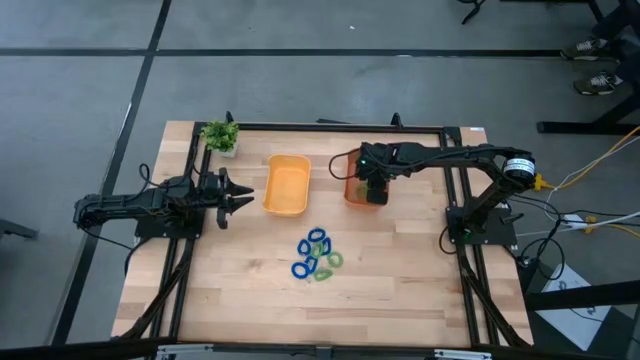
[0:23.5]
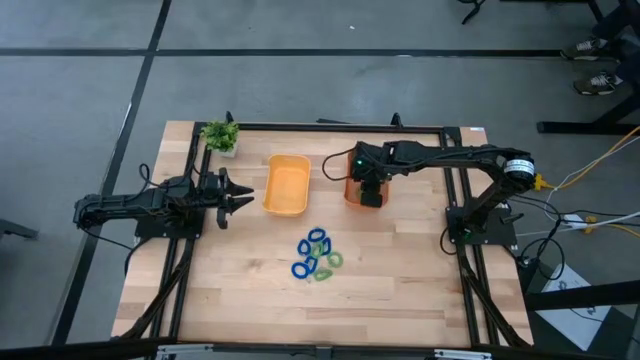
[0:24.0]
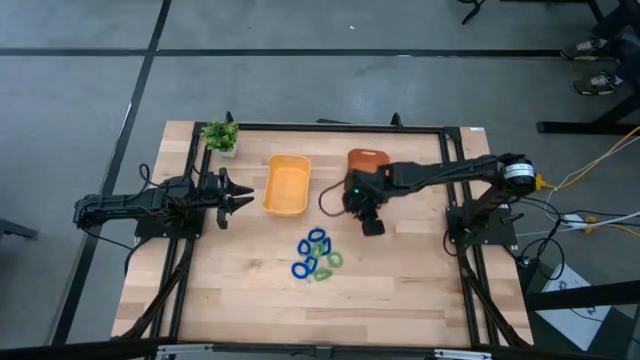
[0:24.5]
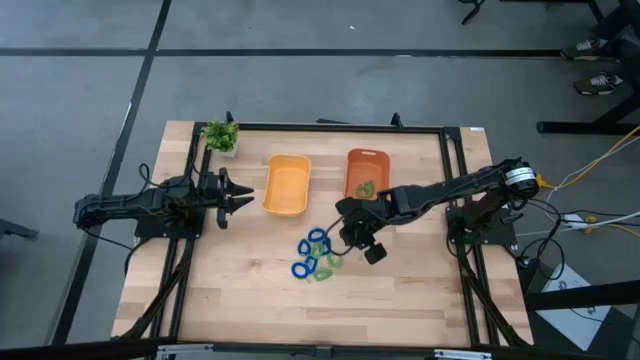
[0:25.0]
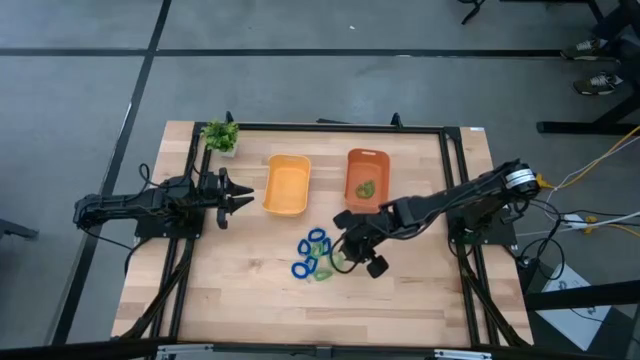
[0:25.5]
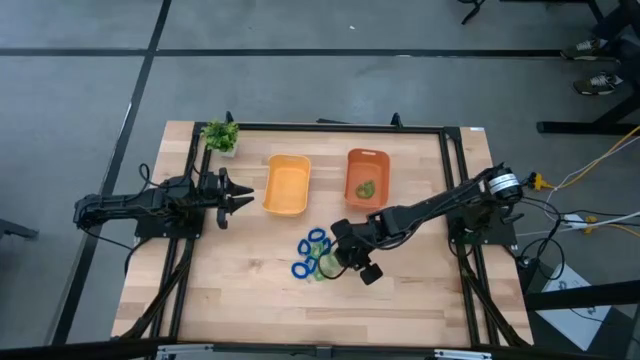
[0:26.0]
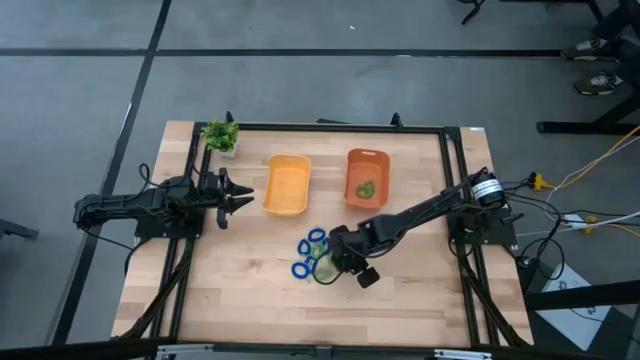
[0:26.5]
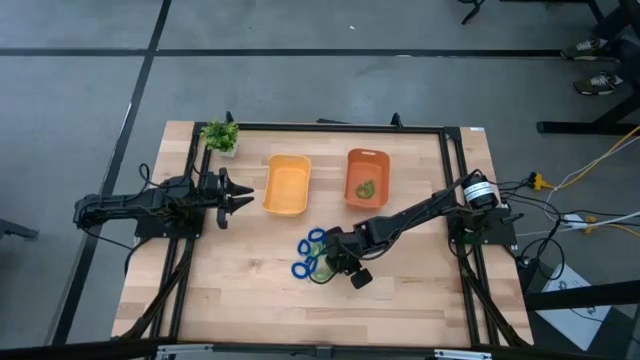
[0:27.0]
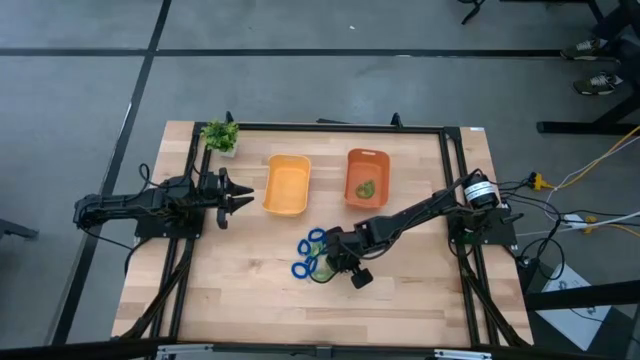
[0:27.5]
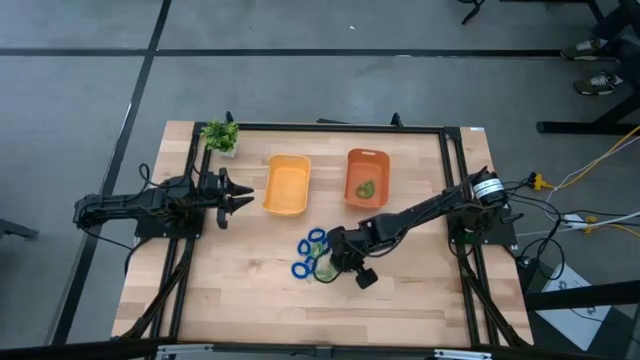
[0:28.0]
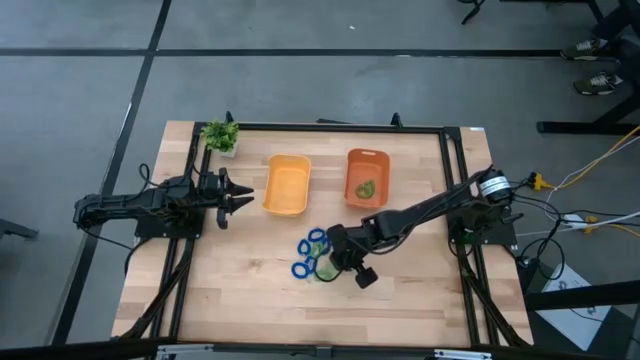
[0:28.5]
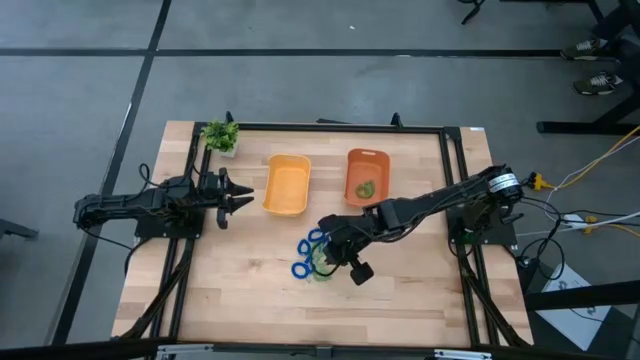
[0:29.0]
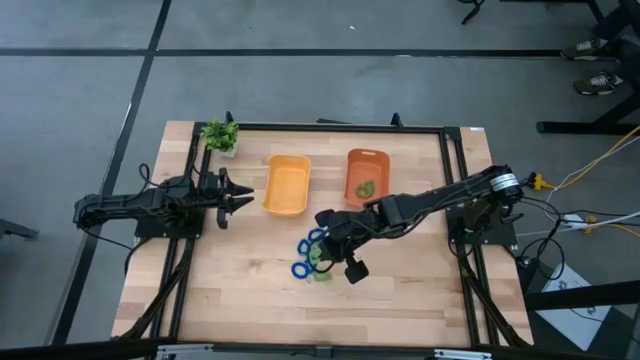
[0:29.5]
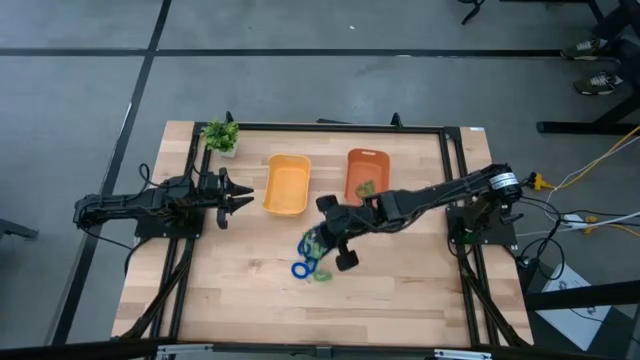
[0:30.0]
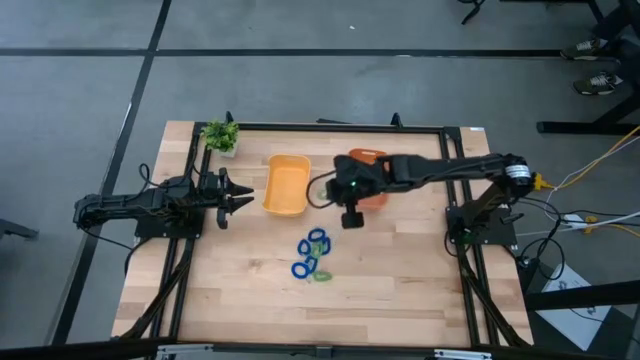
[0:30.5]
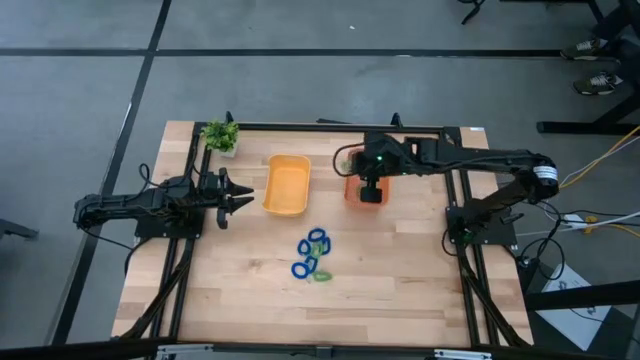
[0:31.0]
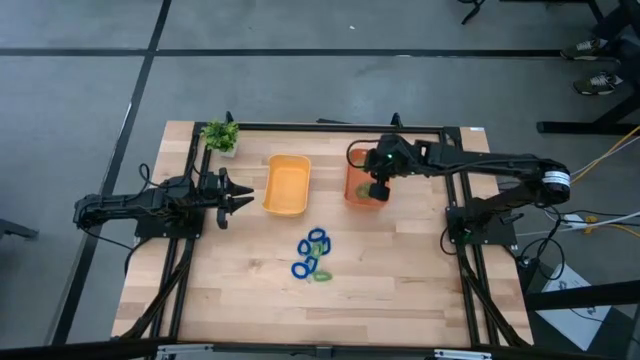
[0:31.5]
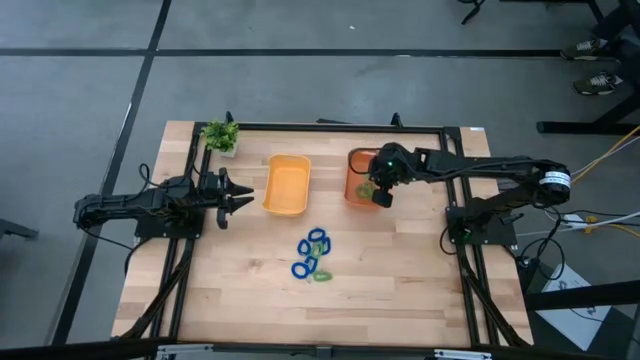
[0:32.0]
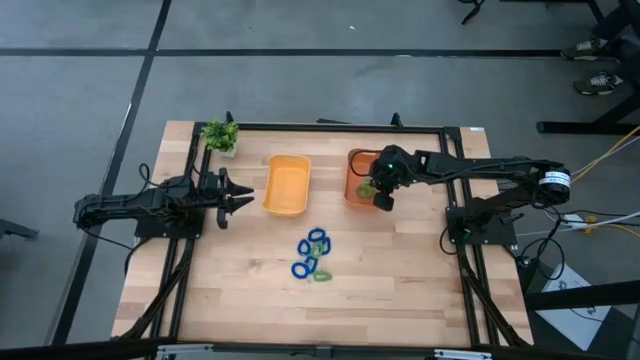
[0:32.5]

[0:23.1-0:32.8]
Task: Sort spring keychains
Put the green spring keychain into the orange bin

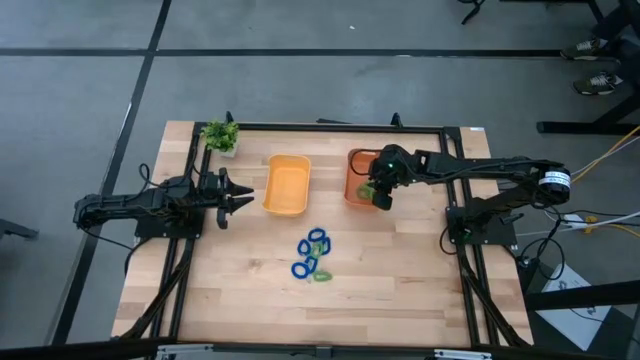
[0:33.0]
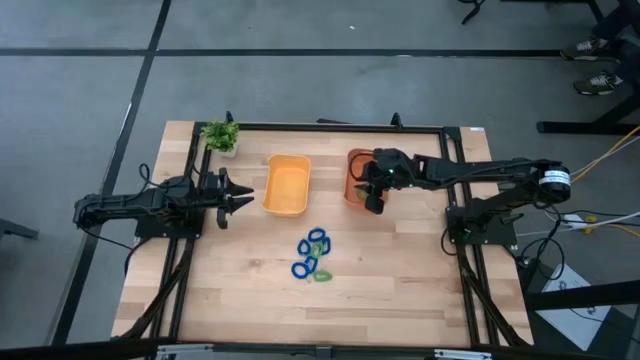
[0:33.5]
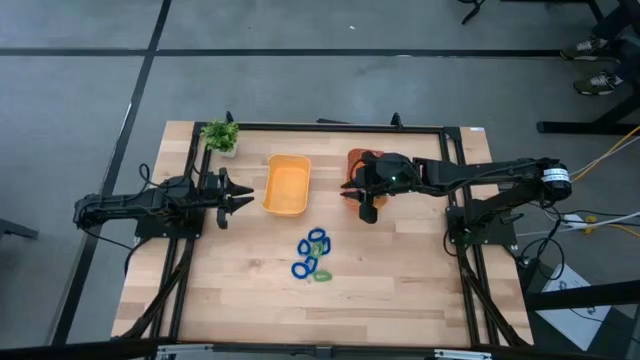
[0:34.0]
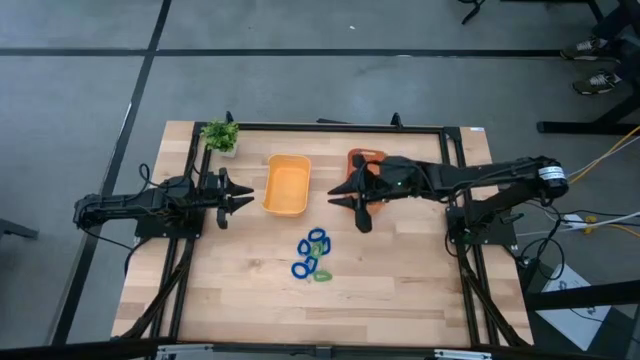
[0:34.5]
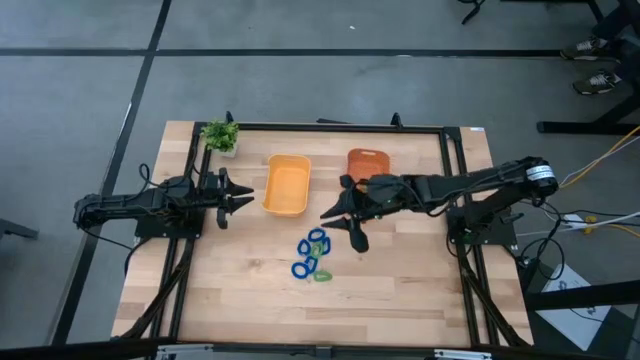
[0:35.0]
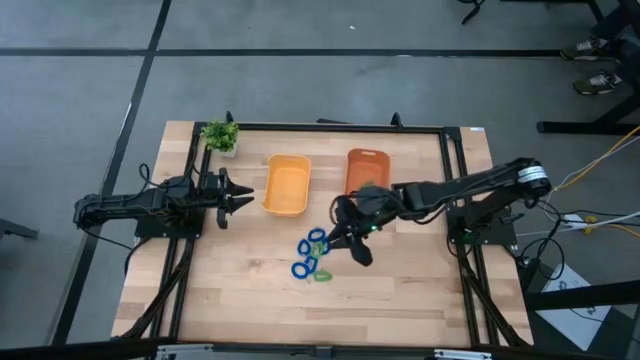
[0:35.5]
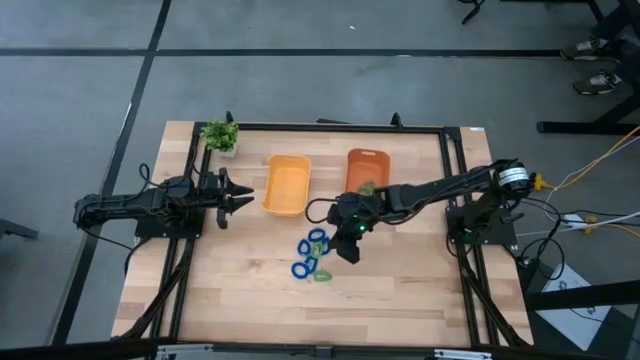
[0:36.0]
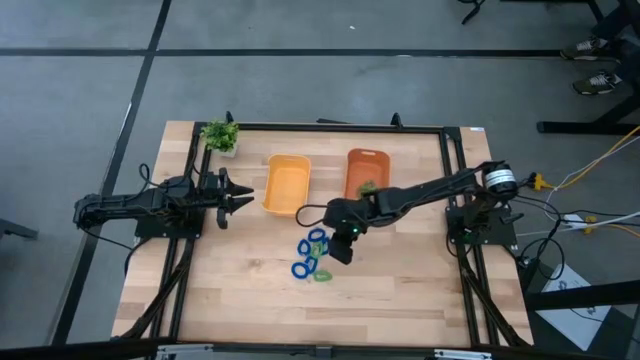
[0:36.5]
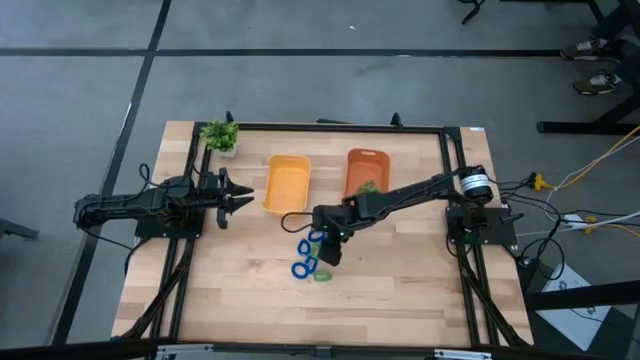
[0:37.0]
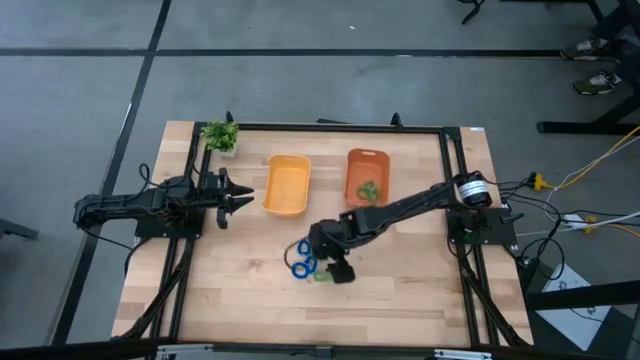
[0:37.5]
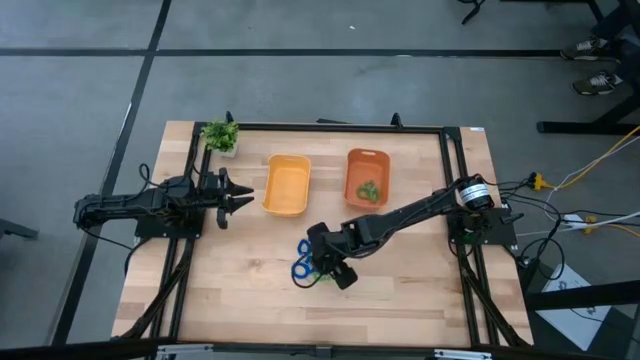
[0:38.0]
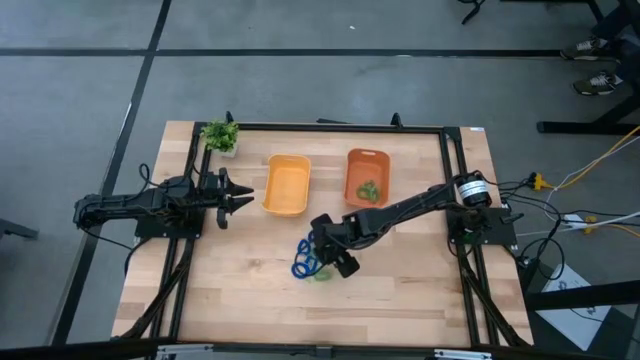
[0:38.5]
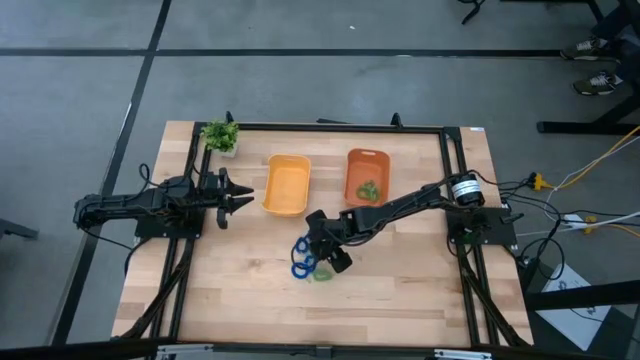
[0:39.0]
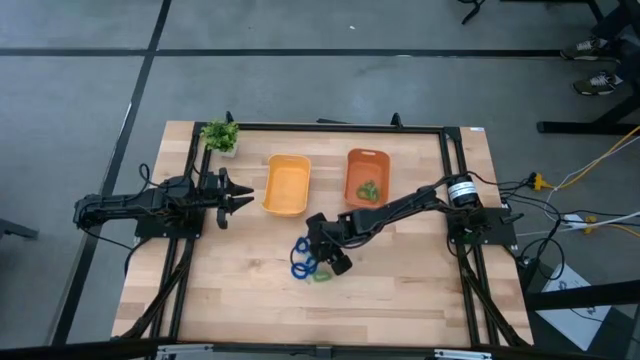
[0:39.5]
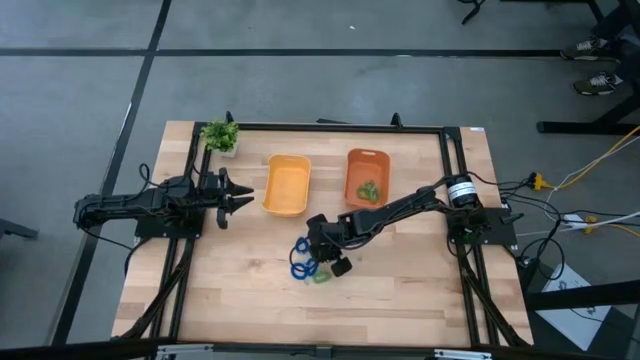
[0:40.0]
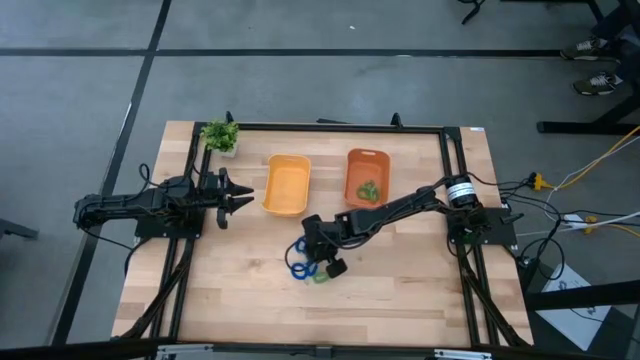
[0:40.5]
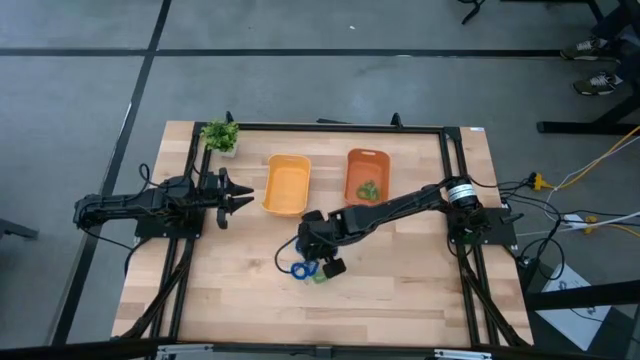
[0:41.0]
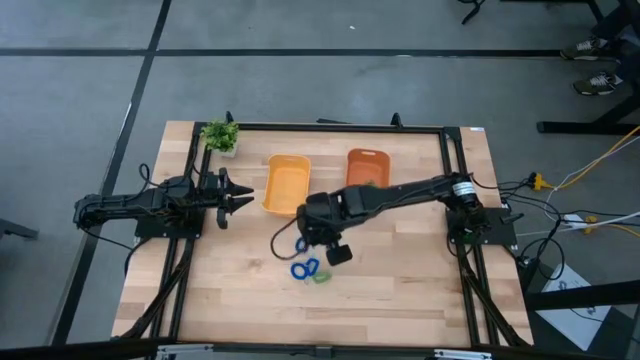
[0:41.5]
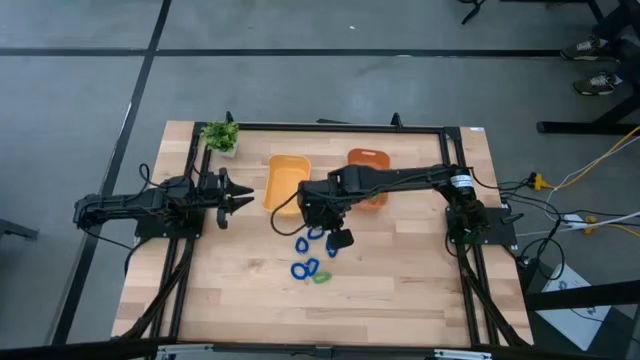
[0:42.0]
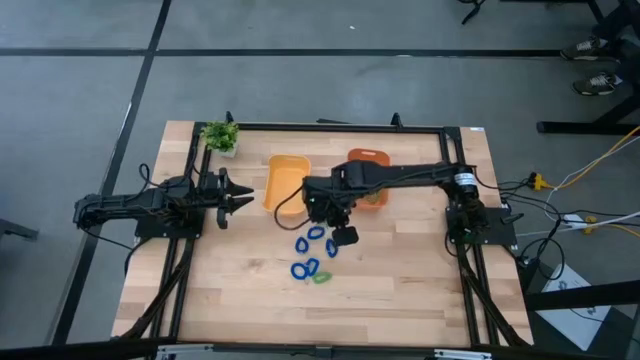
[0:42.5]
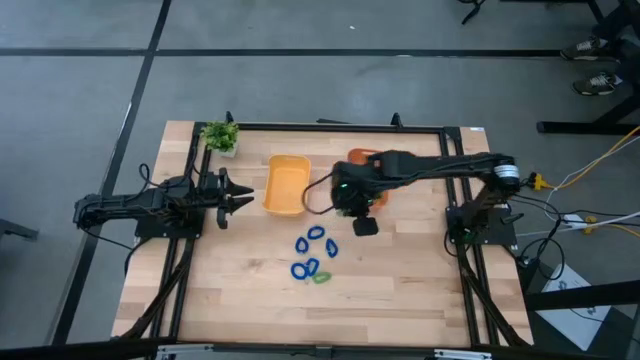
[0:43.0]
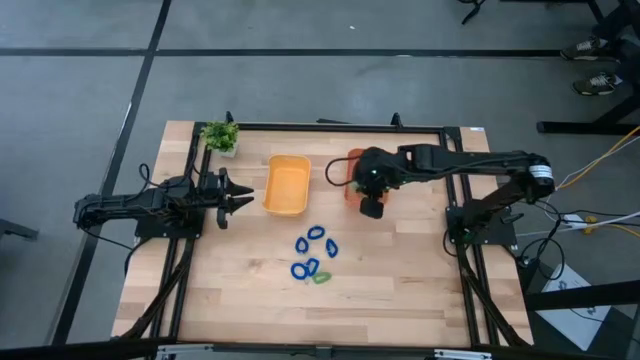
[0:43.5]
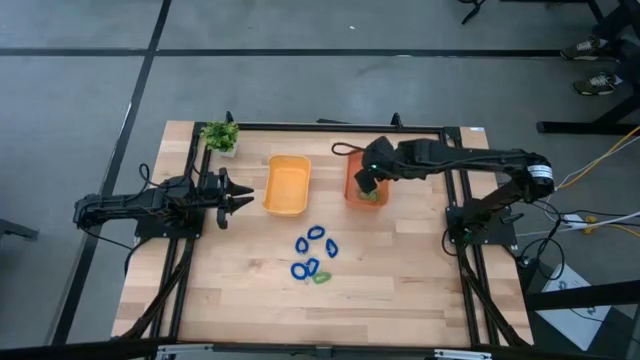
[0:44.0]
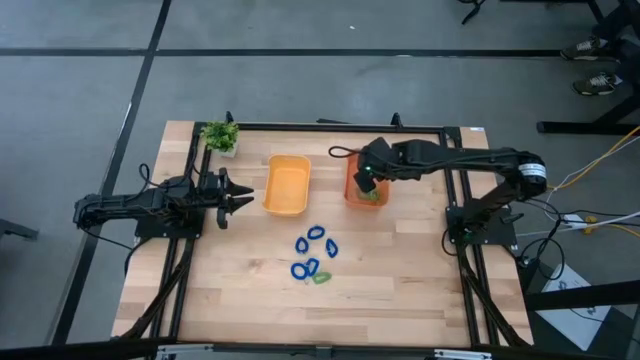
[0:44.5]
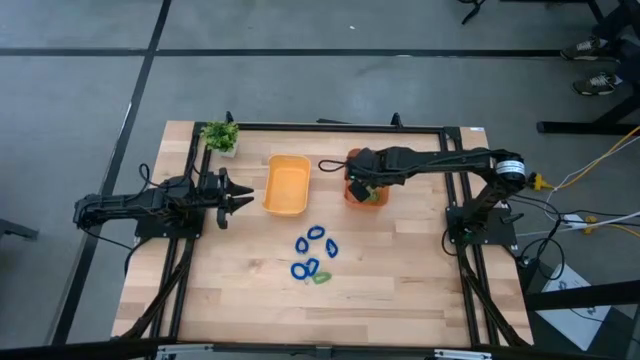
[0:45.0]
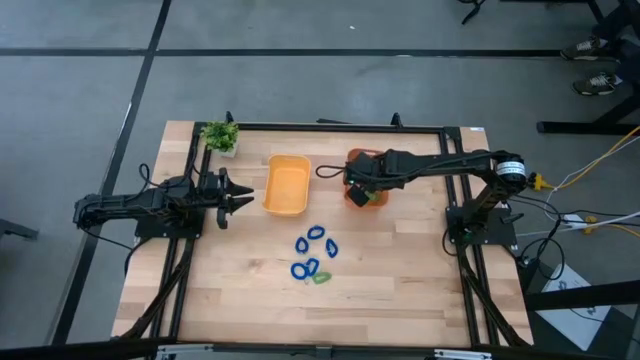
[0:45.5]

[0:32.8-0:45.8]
Put the green spring keychain into the orange bin
